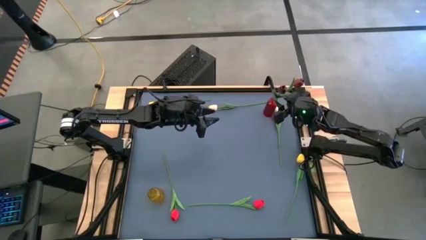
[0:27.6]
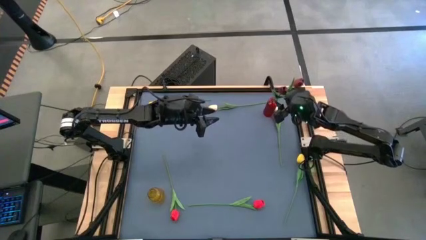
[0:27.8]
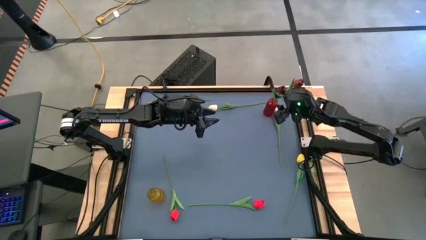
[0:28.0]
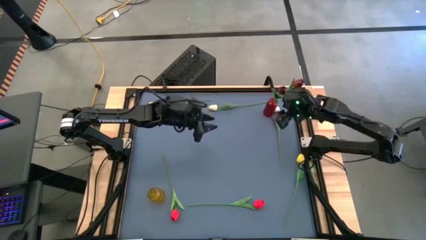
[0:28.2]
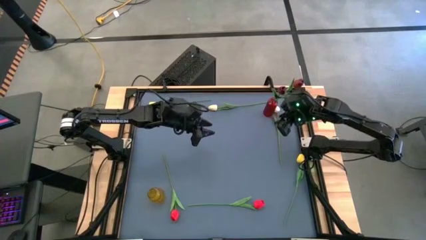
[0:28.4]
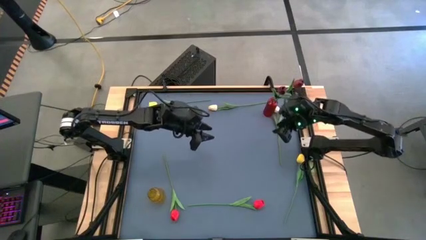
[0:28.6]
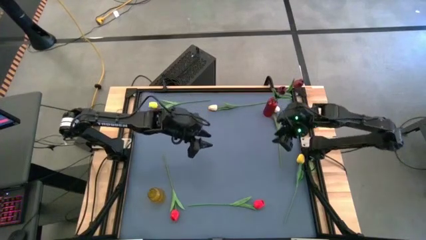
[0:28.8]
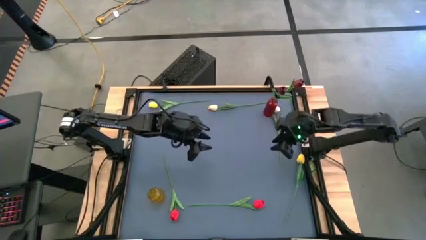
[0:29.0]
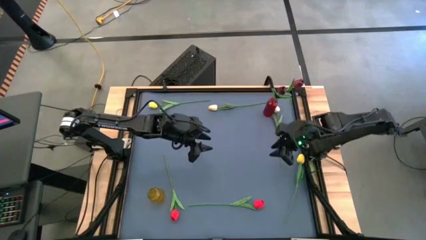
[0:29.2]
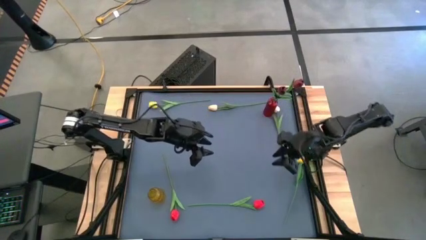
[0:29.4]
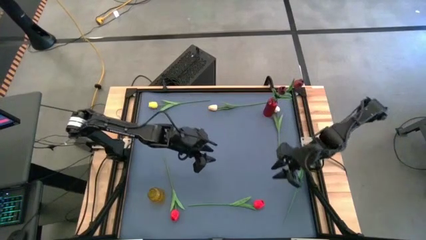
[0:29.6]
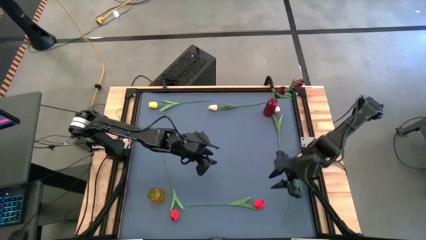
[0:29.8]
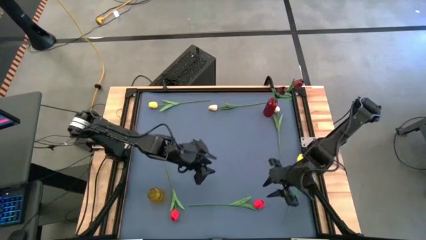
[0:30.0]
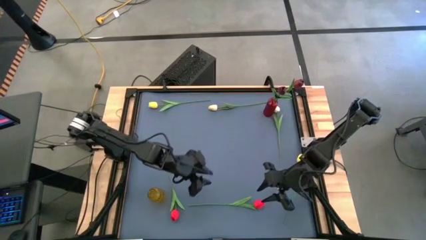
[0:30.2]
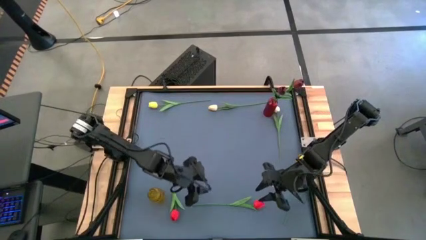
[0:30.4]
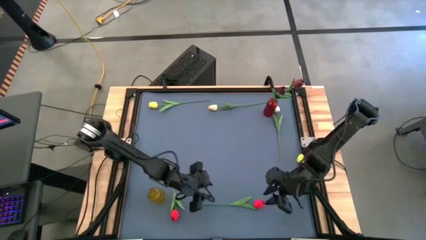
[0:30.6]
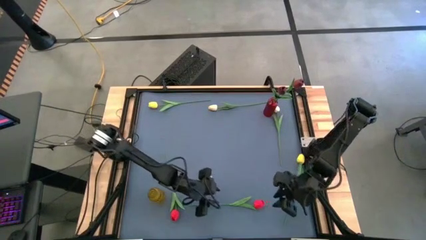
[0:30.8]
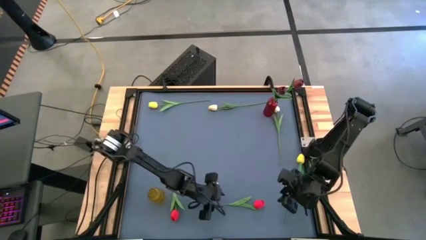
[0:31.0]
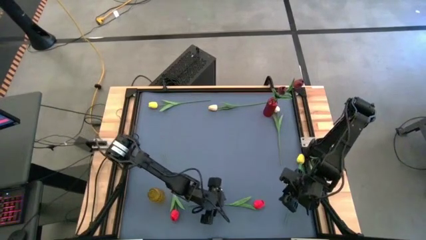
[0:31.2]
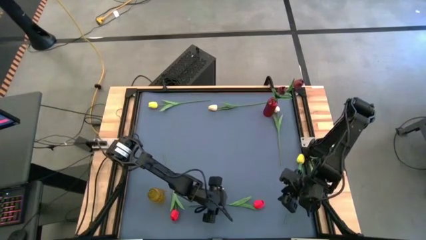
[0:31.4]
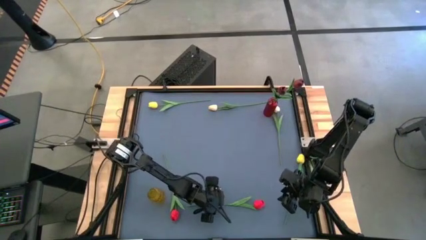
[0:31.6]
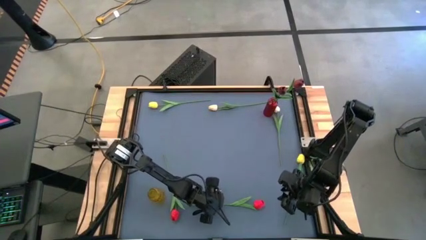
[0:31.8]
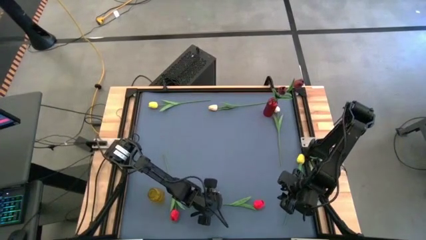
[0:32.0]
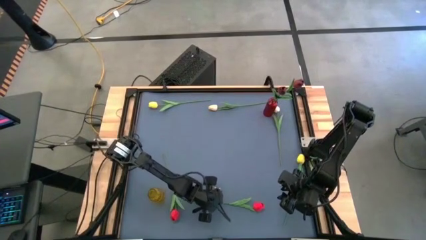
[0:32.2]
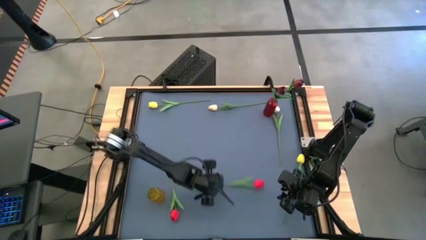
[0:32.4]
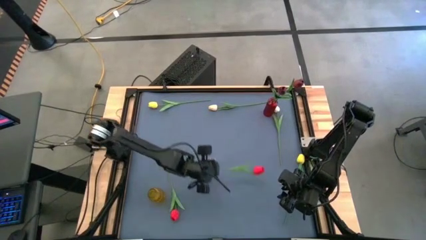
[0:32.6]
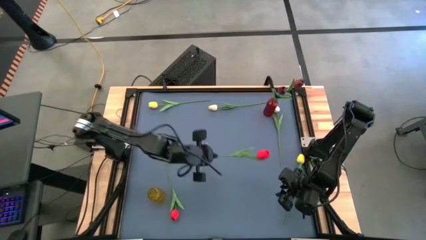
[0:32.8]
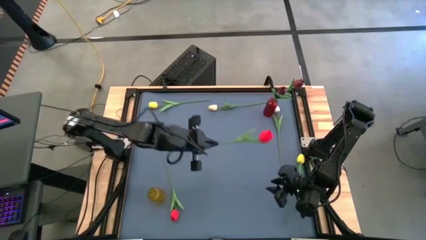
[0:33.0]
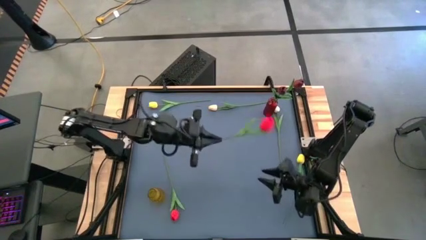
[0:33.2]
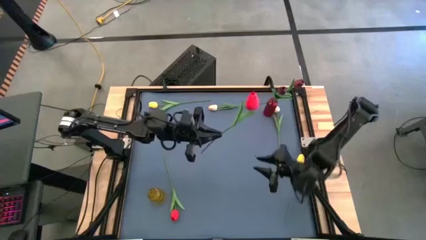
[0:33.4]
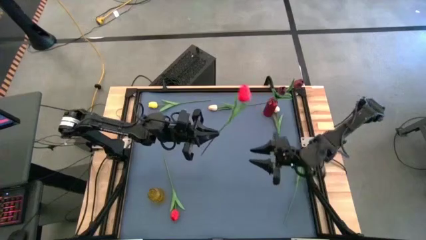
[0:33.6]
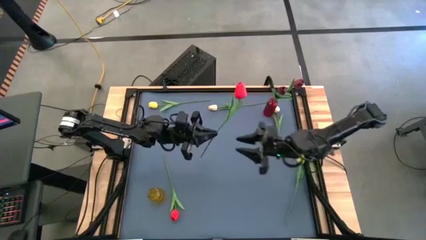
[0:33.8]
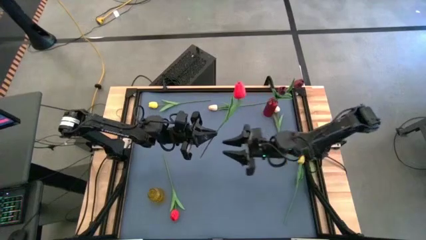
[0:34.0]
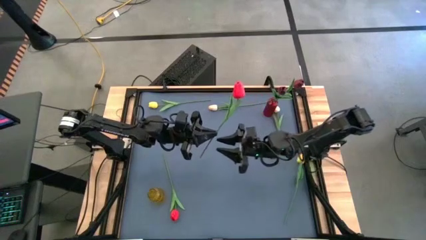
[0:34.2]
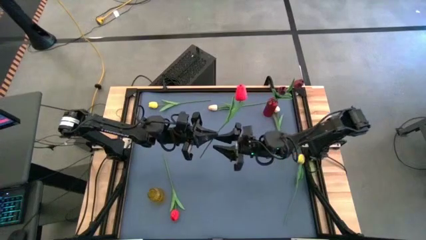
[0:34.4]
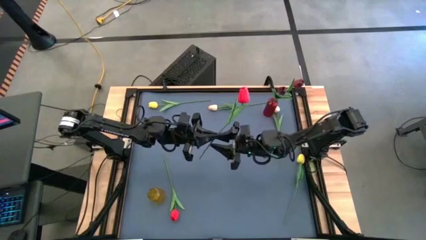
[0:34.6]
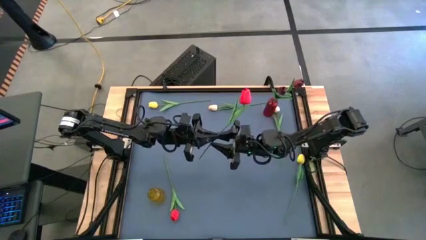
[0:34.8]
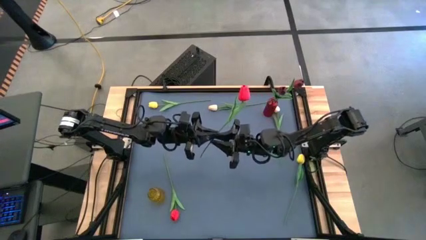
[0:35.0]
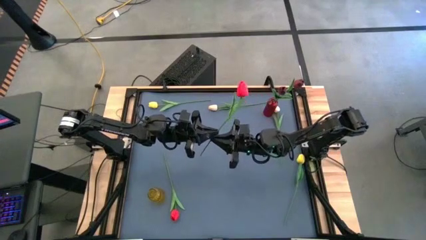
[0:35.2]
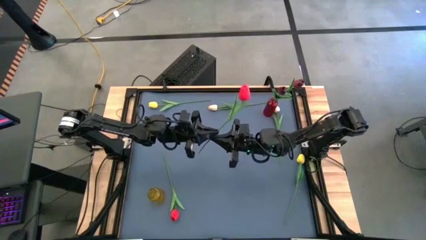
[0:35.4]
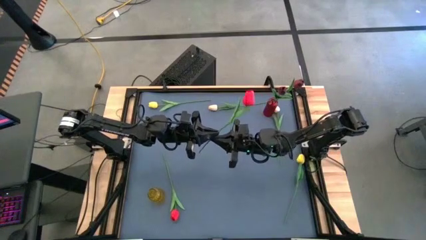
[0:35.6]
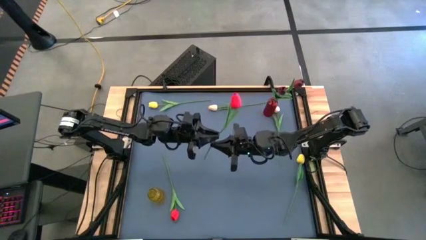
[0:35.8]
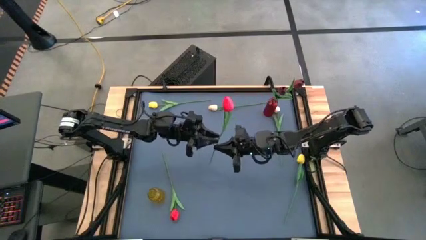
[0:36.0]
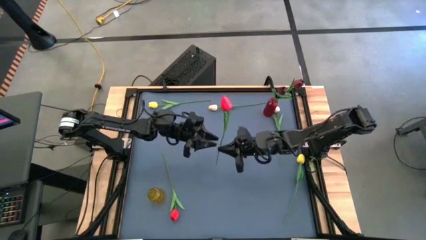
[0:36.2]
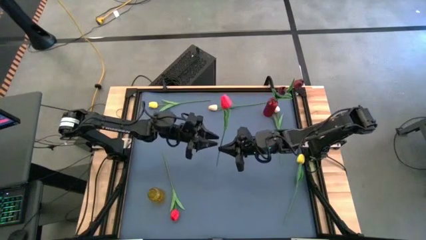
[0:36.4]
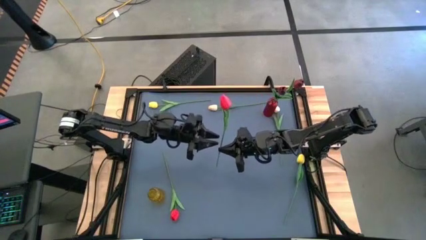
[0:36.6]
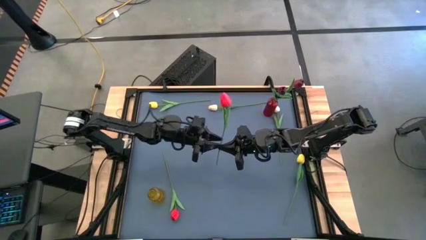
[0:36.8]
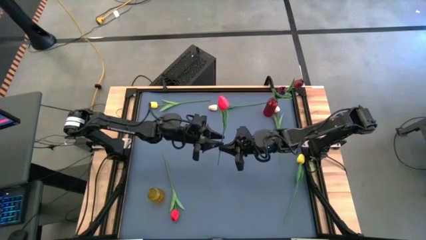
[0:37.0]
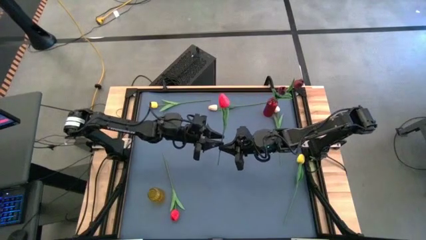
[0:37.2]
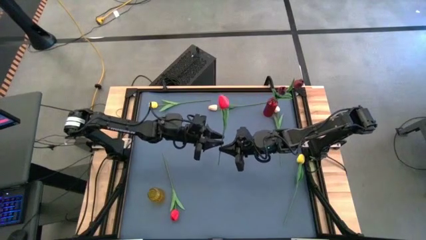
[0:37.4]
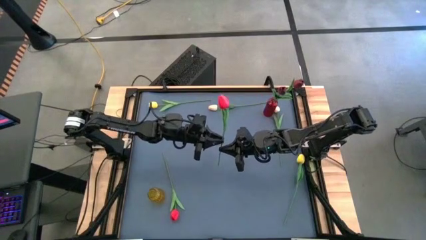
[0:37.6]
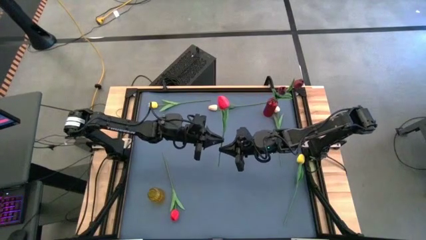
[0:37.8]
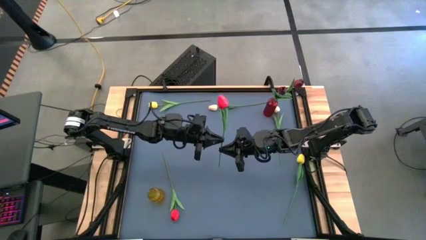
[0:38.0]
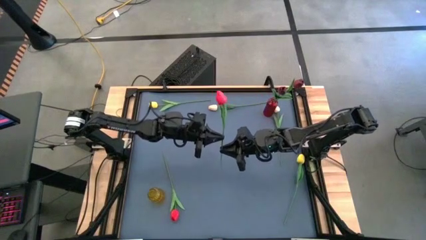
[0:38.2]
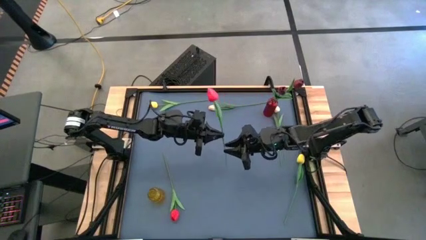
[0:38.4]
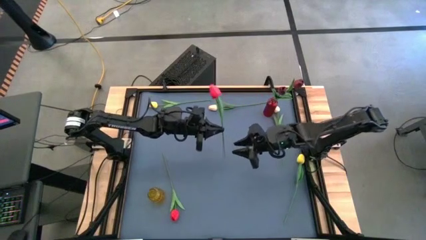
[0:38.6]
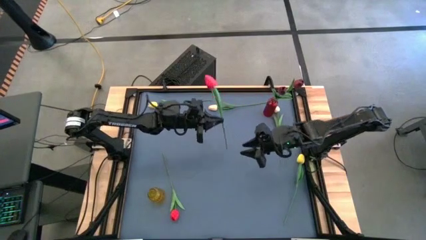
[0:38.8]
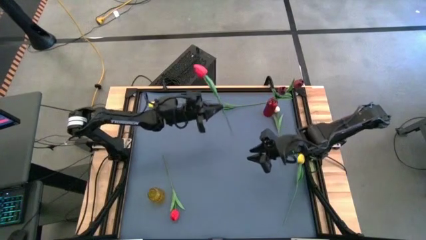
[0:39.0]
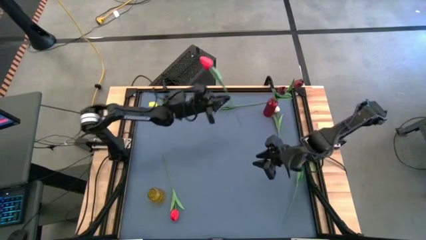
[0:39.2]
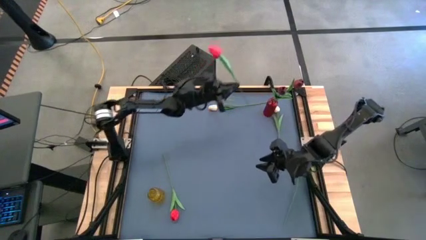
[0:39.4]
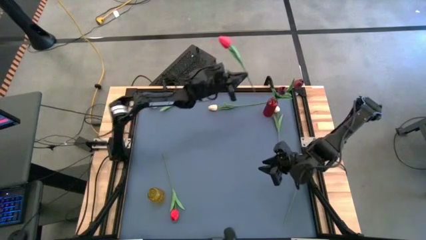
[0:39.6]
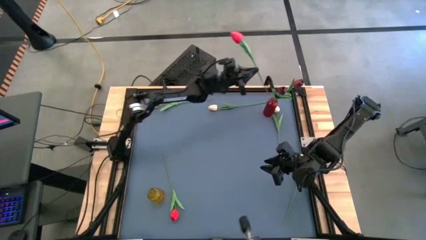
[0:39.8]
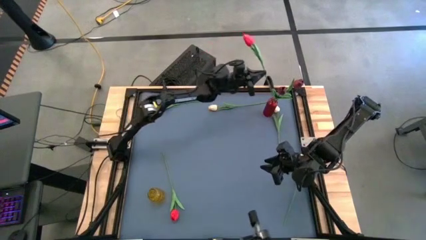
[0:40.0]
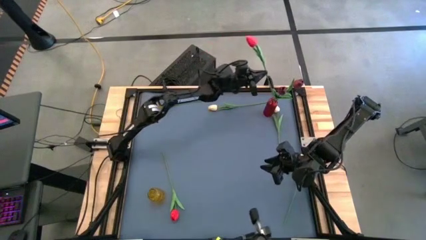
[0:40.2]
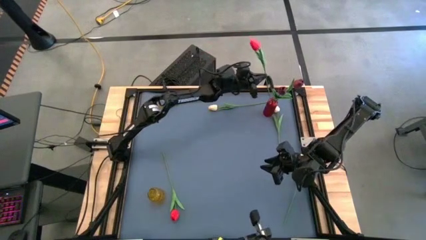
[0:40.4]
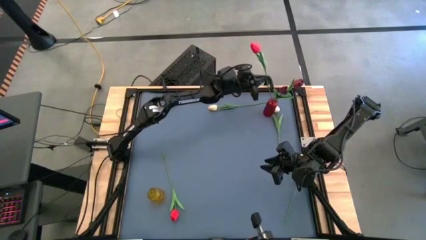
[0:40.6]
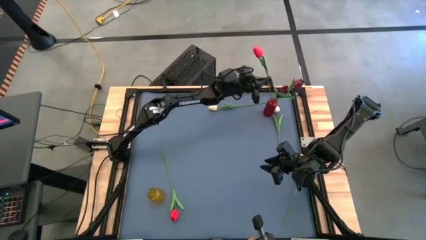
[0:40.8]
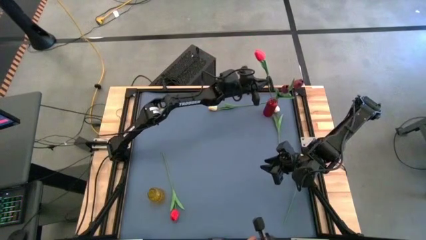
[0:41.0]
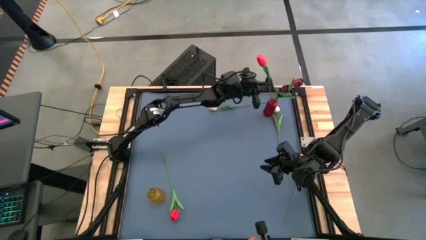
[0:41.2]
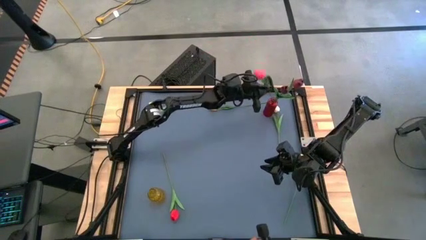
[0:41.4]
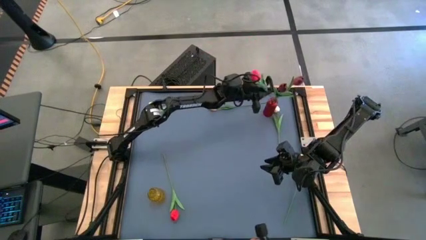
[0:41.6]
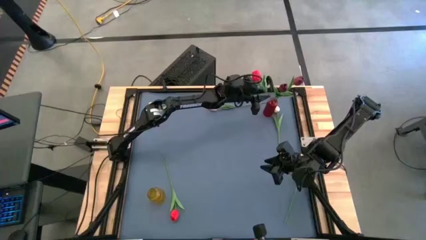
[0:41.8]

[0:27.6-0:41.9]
Task: Sort flowers into vase by color
Put the right red flower into the red vase
